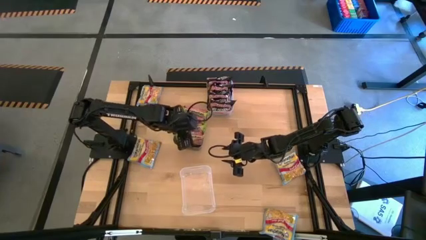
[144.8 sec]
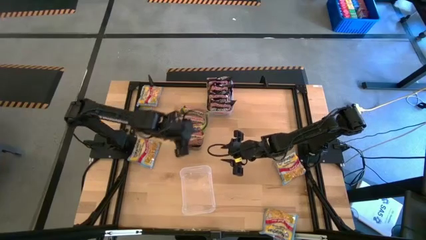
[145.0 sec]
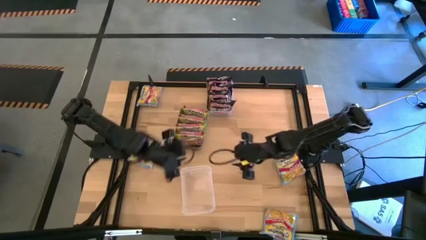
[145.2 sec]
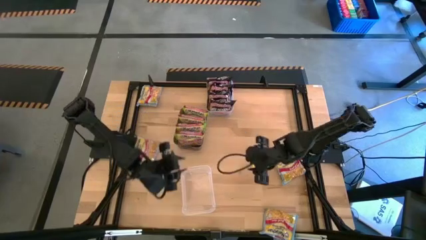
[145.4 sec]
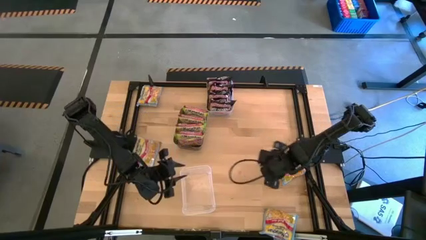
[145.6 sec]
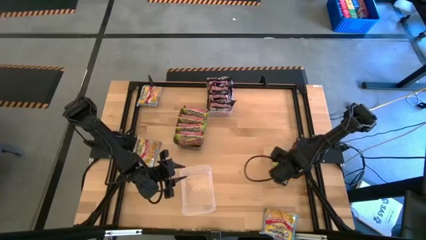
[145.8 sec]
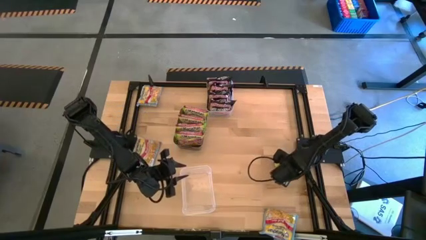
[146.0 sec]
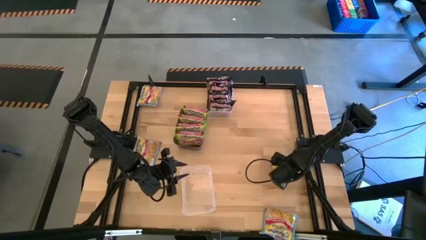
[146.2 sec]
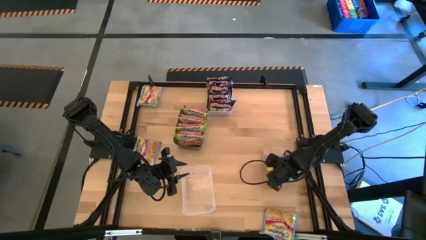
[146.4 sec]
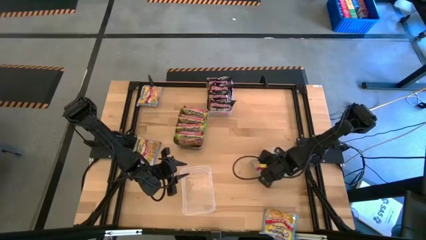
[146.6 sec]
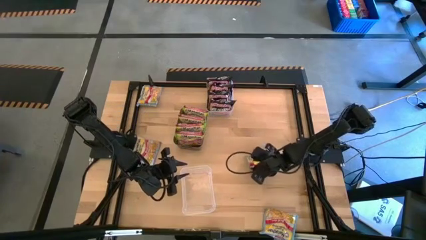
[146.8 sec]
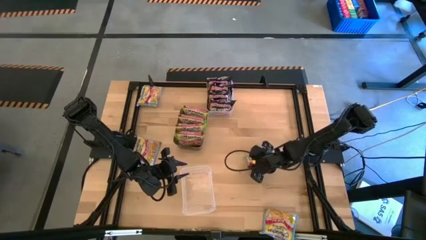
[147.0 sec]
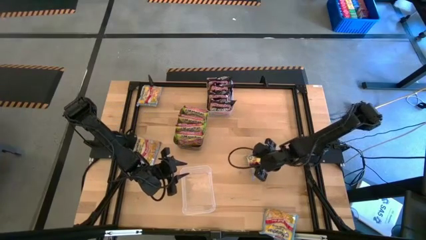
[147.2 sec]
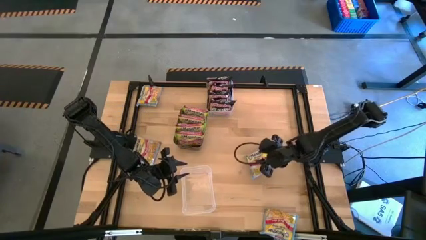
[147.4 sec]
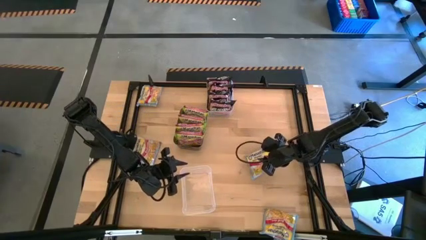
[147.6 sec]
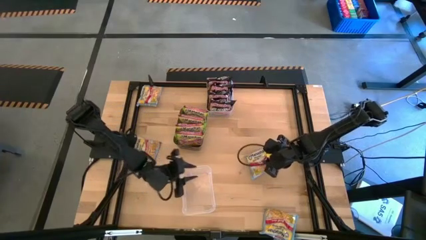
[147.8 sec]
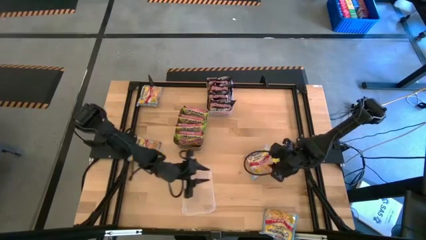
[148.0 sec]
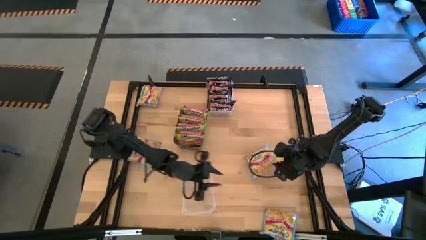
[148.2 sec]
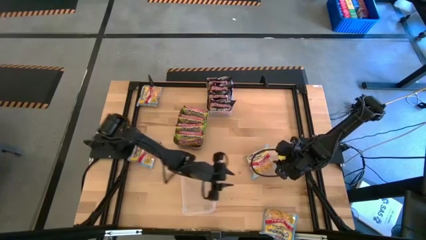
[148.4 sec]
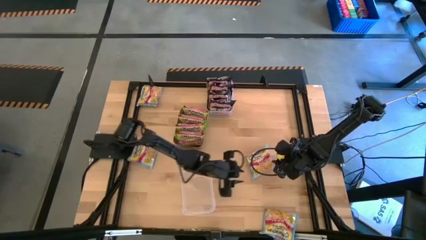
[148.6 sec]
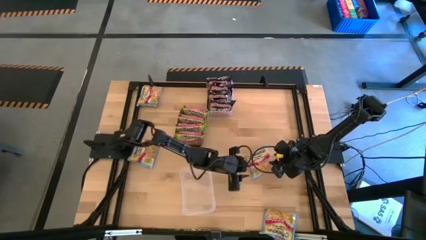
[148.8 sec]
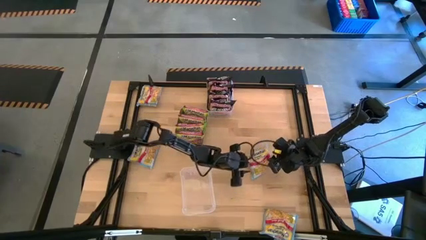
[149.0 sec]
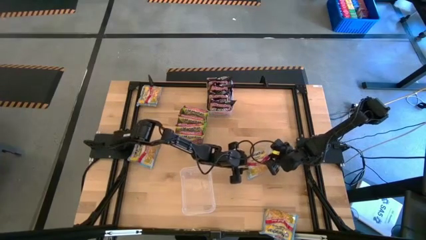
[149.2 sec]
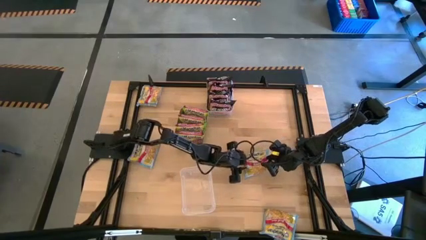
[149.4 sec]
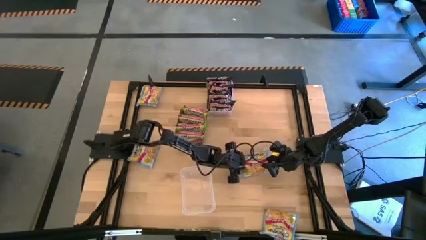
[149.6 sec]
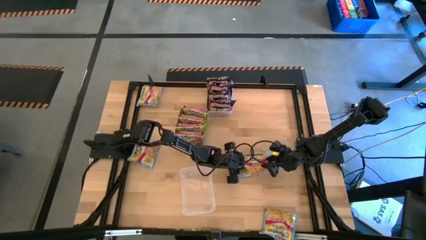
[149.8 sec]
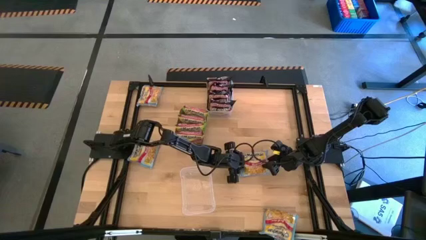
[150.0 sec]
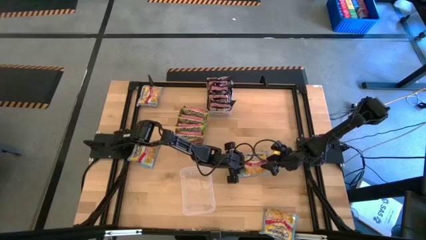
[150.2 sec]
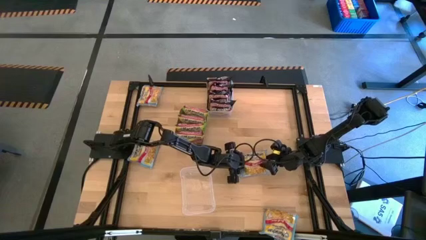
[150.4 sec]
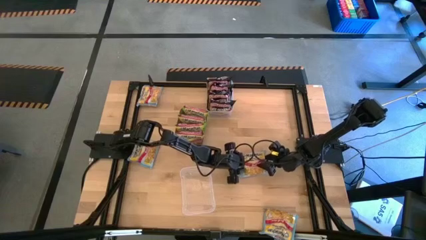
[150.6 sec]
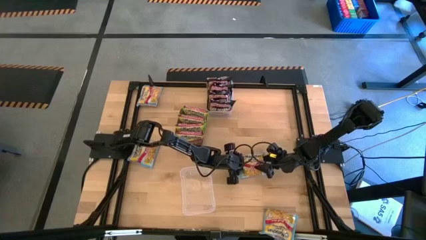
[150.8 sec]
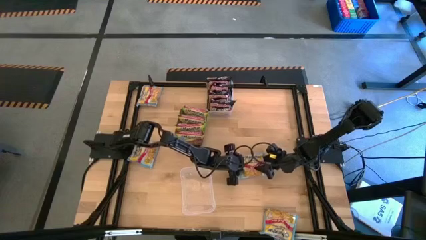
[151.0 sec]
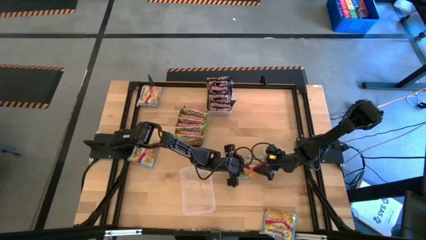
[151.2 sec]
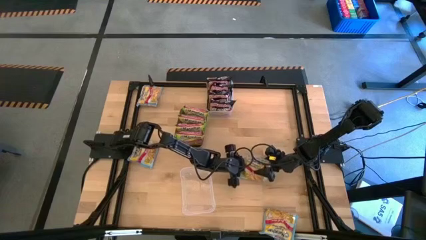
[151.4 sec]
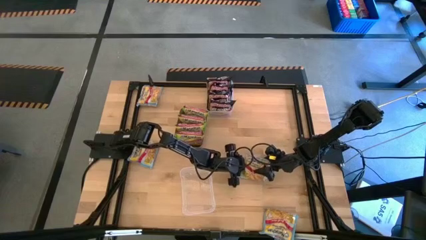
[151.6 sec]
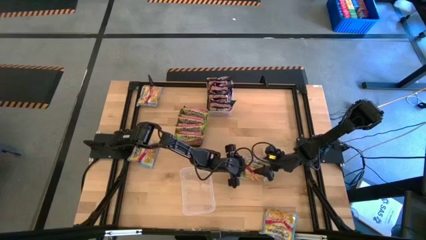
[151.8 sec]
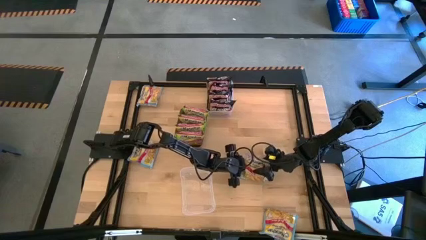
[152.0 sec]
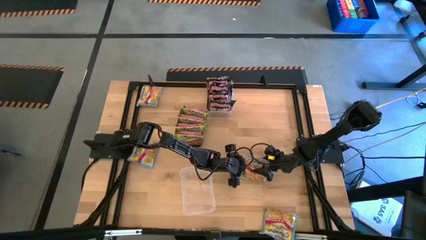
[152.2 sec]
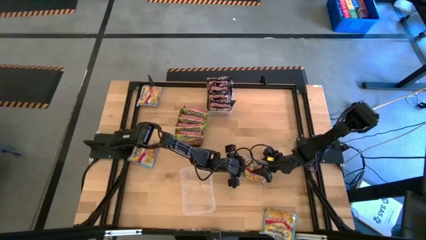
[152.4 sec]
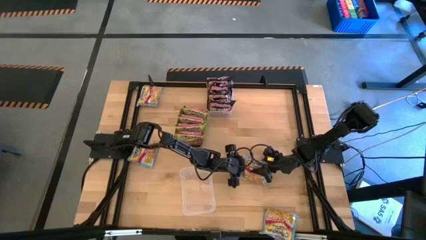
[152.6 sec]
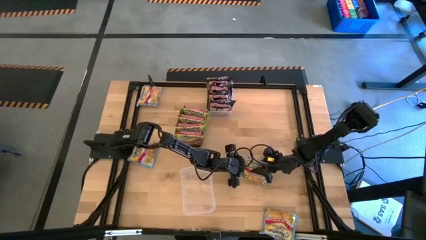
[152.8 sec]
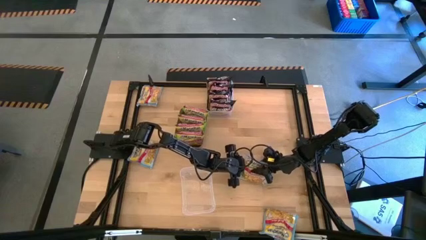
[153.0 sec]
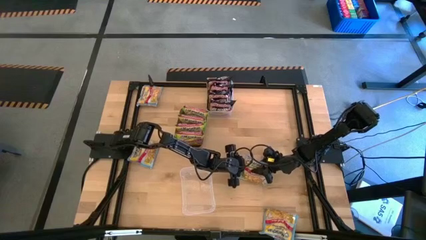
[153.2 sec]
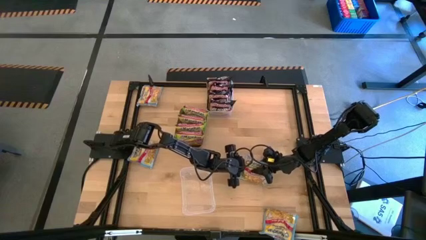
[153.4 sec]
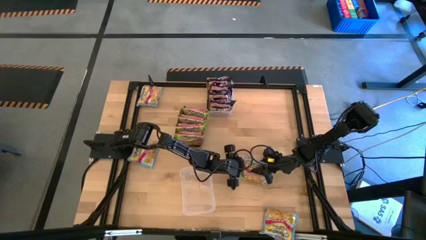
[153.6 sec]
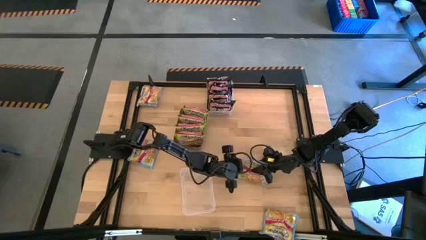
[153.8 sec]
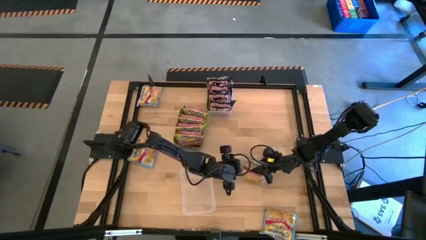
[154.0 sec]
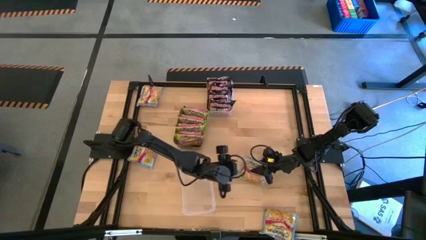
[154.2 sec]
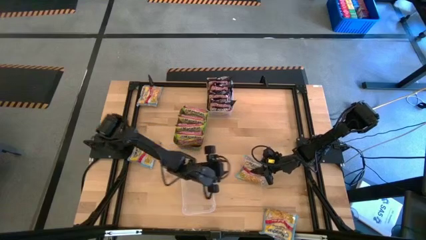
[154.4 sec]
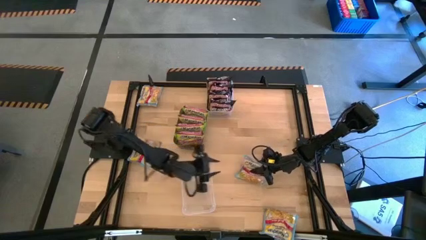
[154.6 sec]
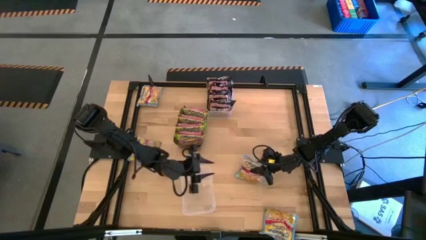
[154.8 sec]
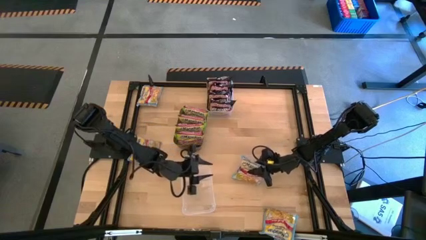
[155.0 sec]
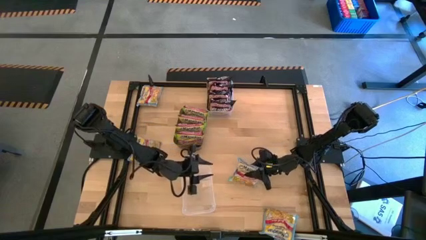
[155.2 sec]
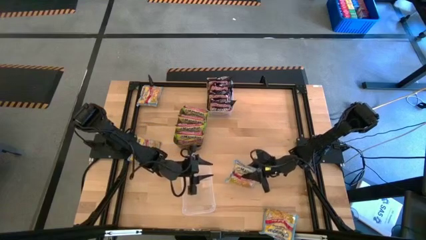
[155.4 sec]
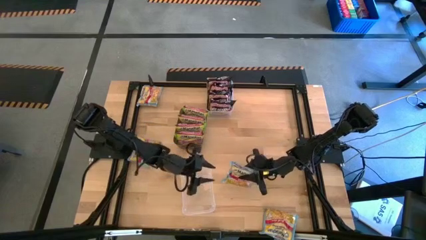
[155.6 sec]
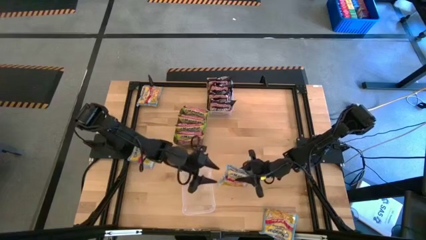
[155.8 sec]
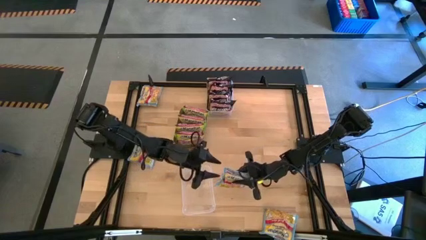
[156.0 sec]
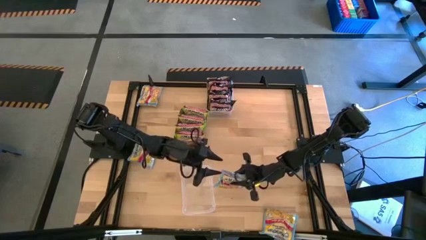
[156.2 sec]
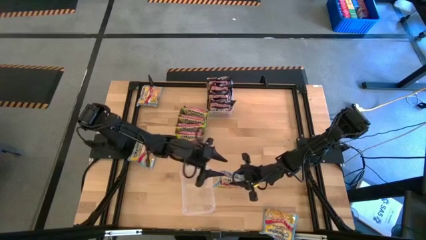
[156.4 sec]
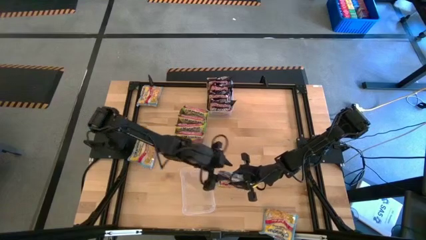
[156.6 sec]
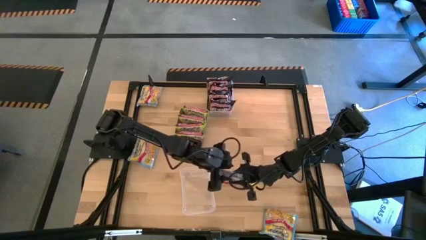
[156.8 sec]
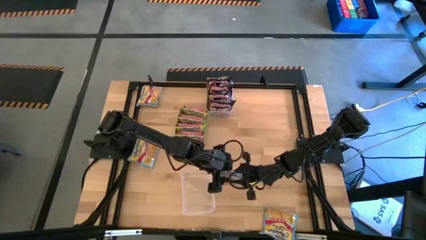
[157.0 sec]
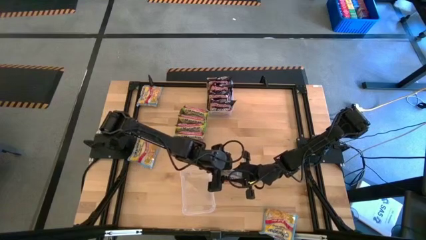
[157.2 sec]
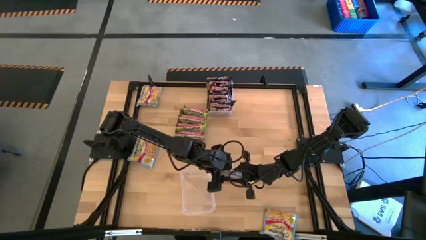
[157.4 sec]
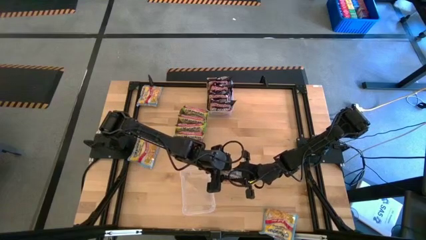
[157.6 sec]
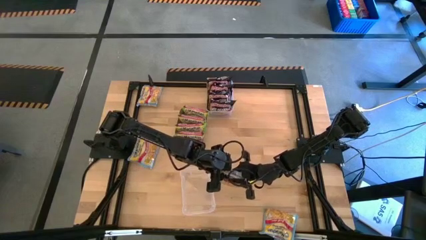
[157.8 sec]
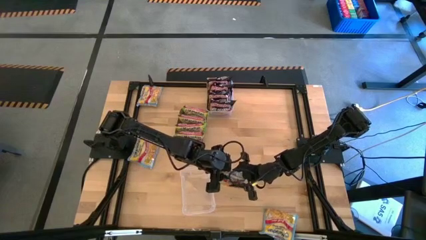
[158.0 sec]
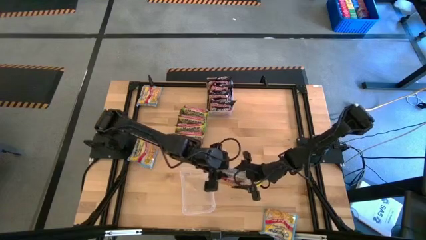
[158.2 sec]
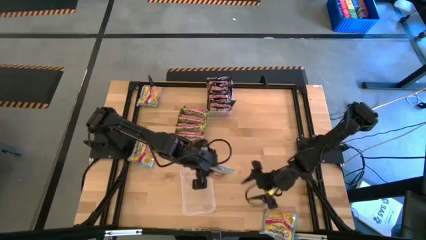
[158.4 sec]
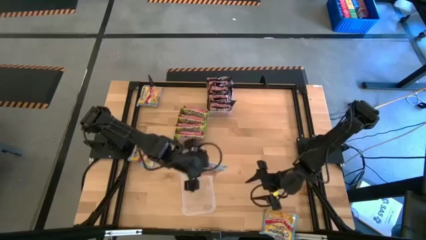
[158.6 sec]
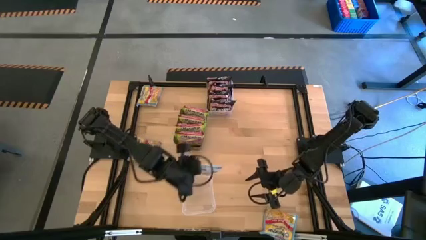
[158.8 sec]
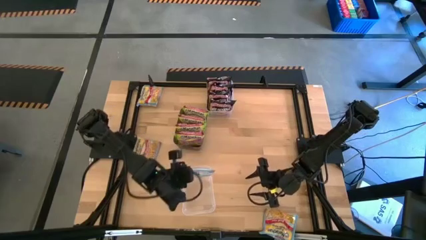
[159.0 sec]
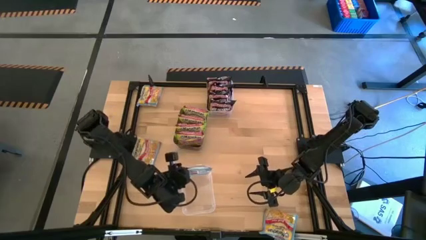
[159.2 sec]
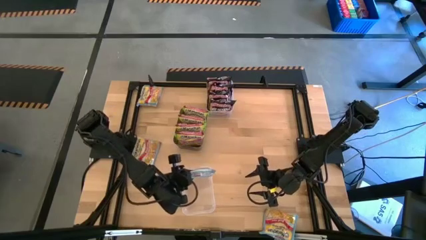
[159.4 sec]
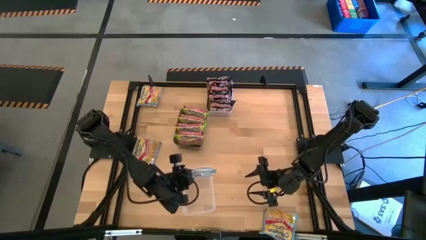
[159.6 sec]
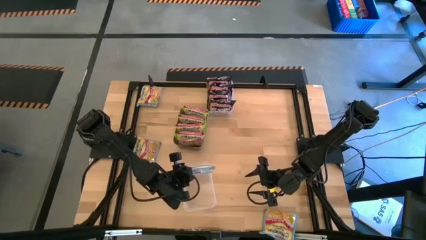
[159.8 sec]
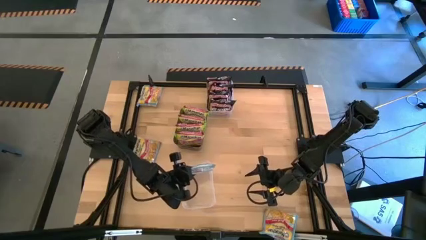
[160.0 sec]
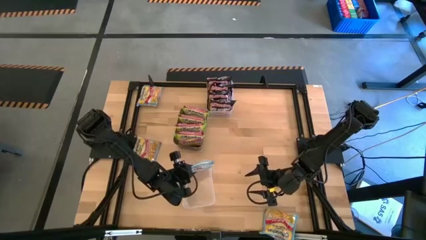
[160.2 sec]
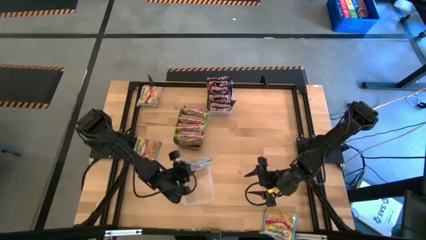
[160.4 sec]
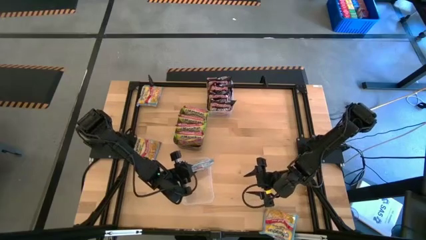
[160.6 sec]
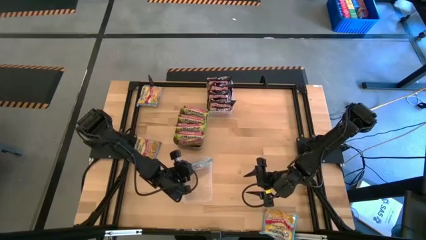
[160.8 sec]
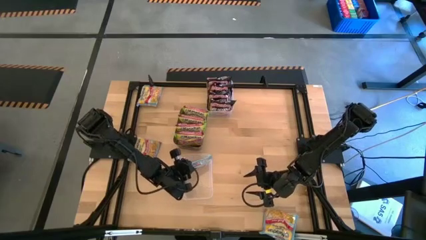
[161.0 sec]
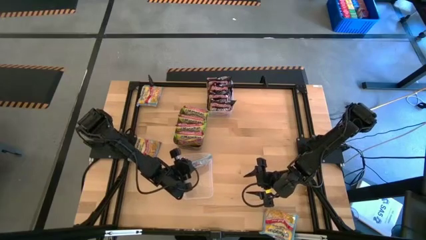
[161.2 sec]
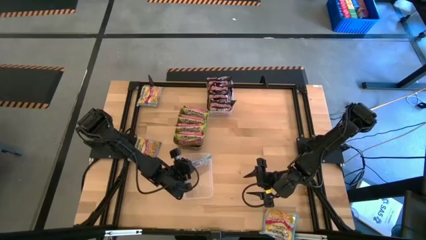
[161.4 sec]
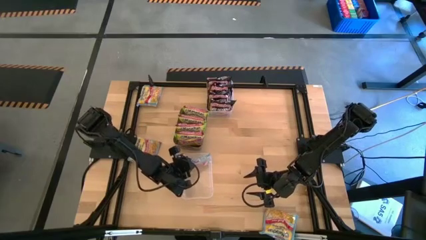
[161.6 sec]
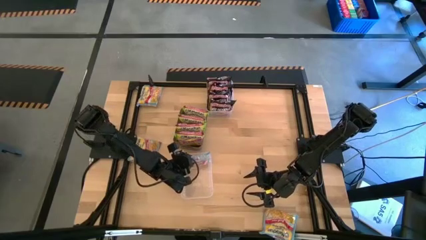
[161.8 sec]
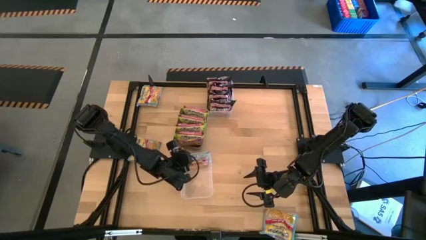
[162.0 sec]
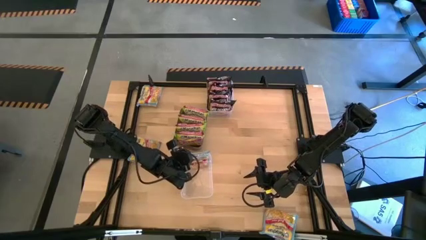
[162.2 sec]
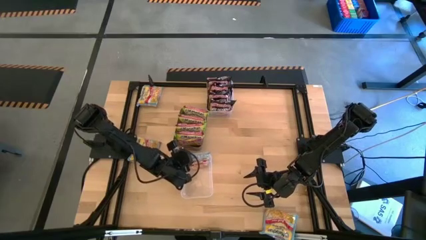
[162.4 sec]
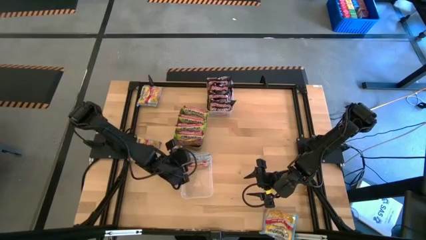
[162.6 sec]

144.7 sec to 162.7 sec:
Task: Sort Maruchan noodles
Put the blue noodle pack into the bottom transparent bin
